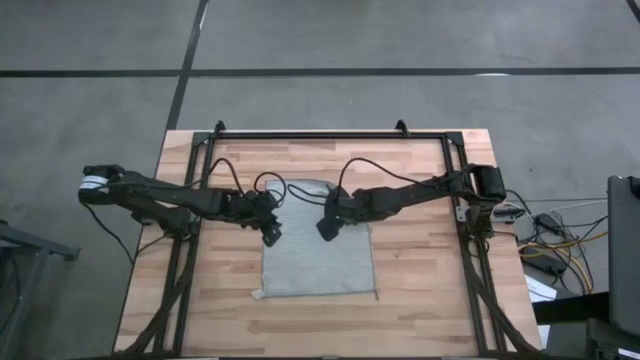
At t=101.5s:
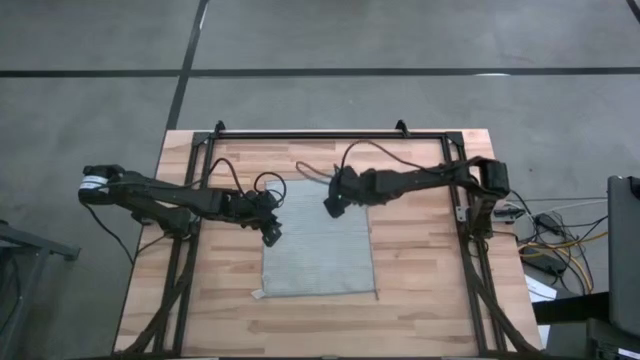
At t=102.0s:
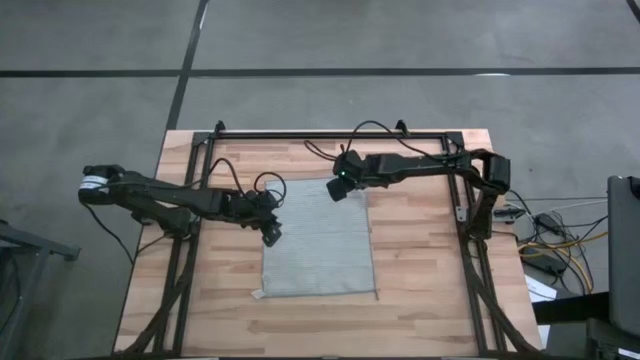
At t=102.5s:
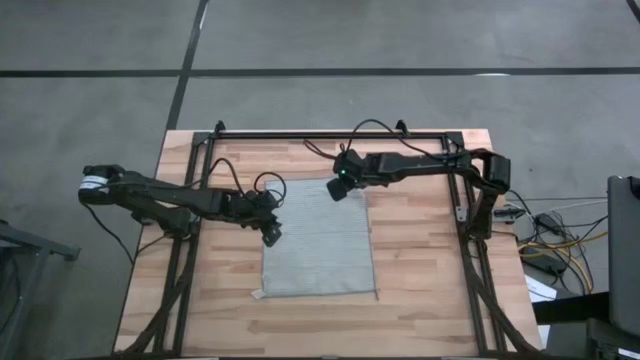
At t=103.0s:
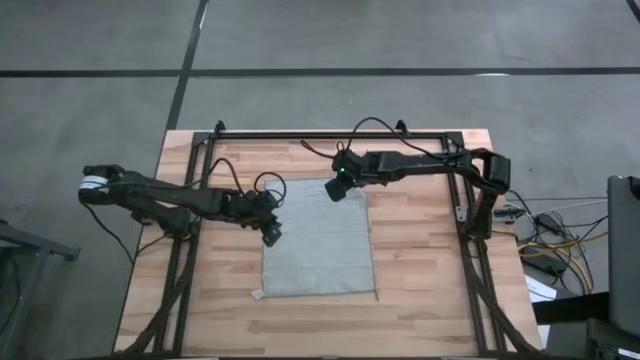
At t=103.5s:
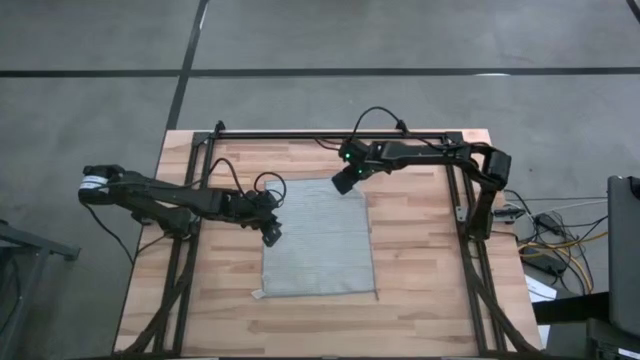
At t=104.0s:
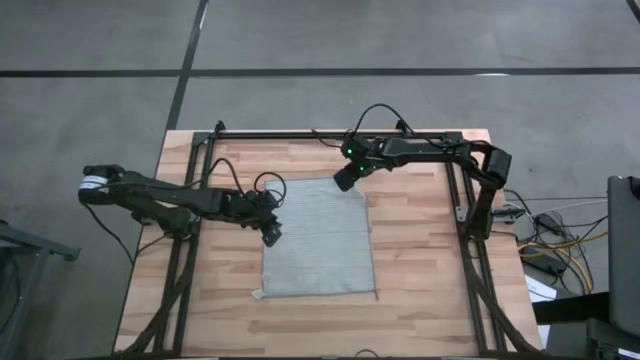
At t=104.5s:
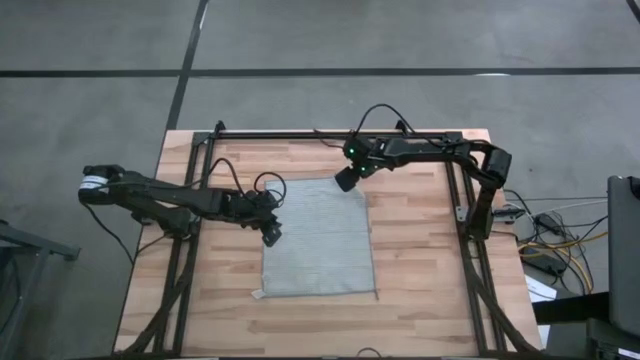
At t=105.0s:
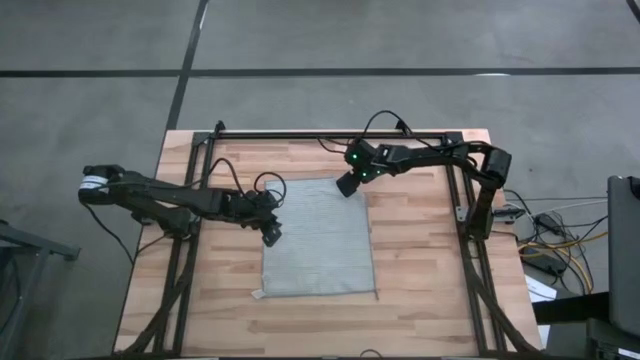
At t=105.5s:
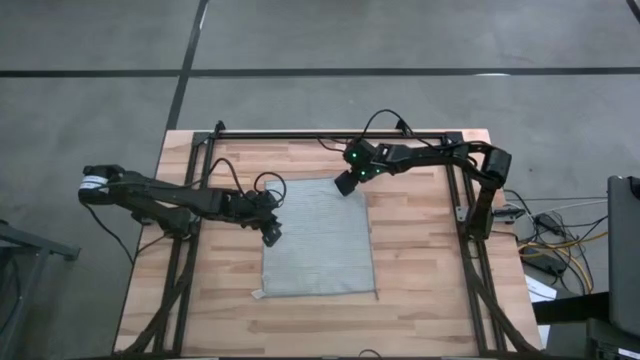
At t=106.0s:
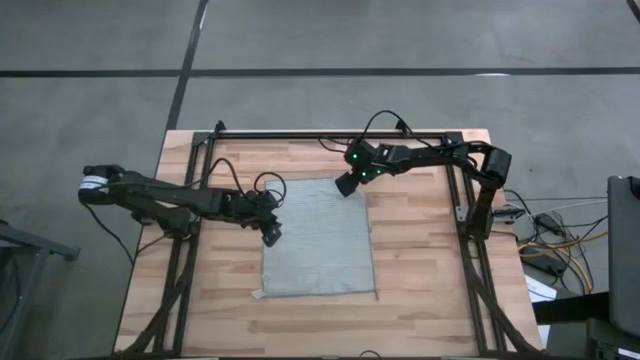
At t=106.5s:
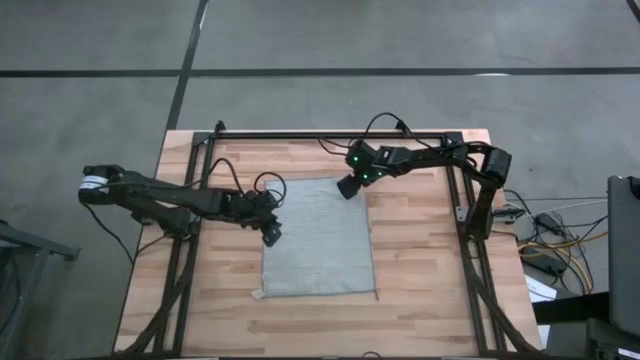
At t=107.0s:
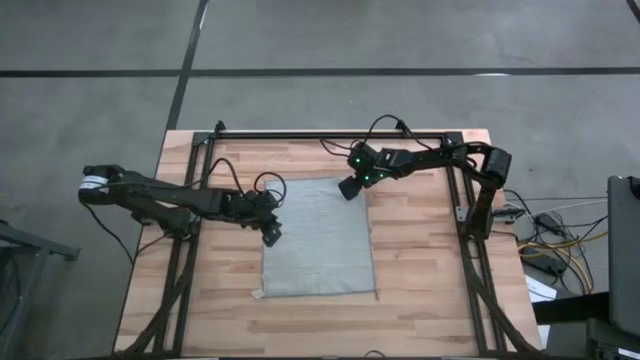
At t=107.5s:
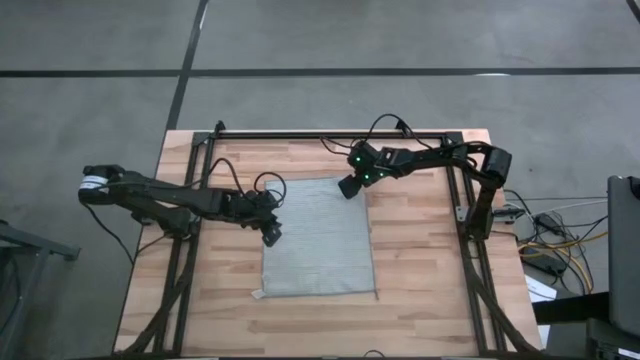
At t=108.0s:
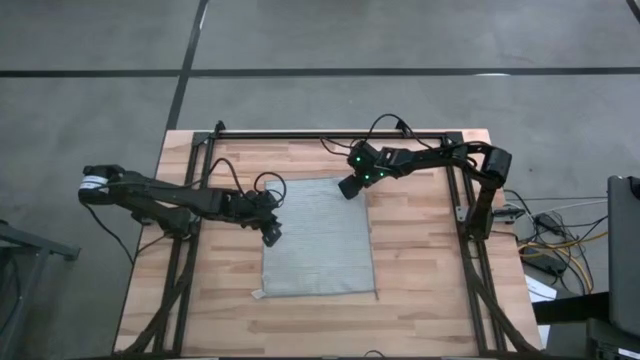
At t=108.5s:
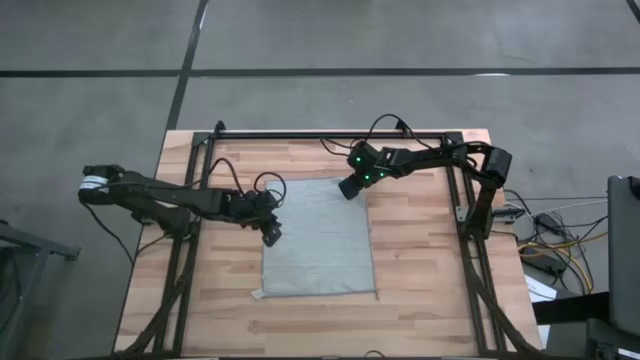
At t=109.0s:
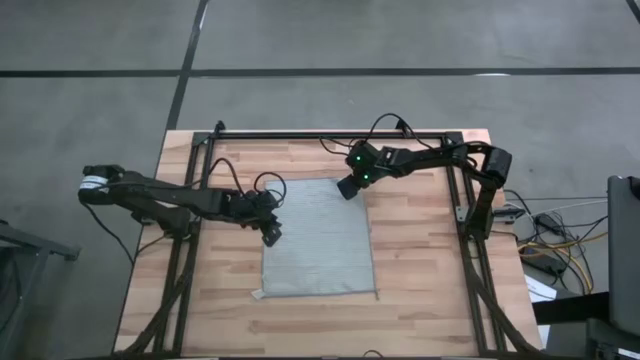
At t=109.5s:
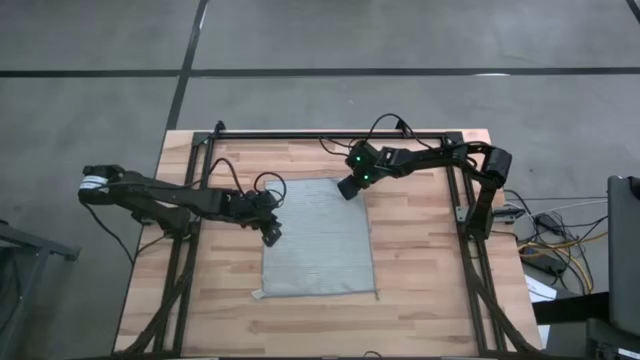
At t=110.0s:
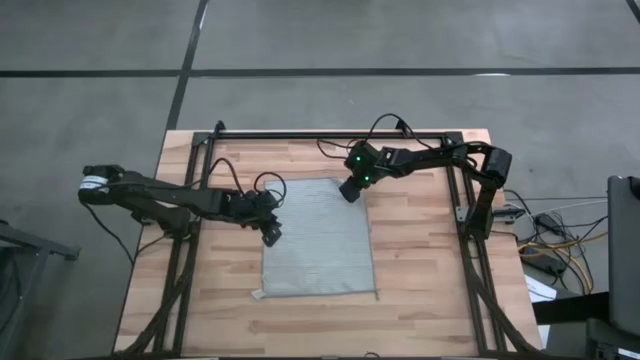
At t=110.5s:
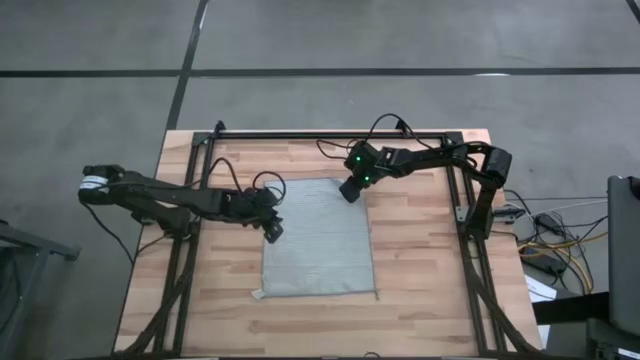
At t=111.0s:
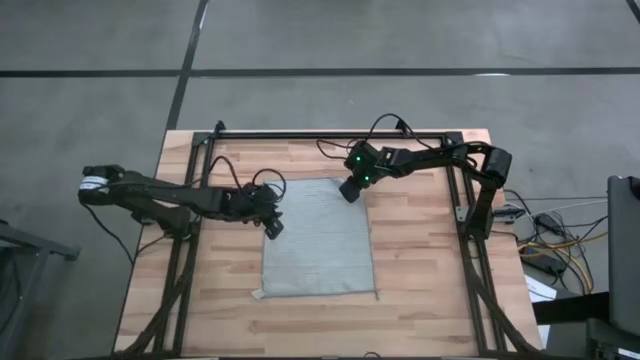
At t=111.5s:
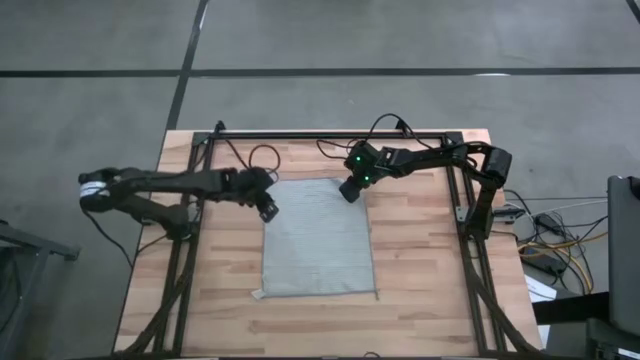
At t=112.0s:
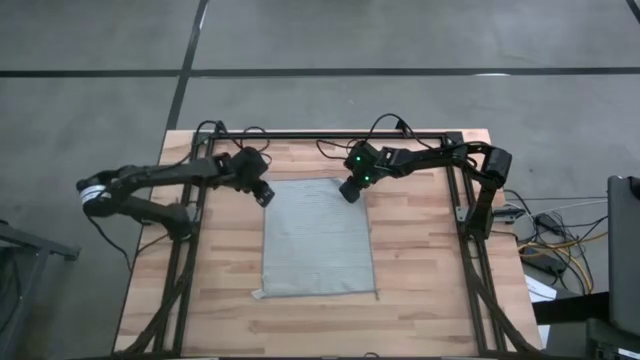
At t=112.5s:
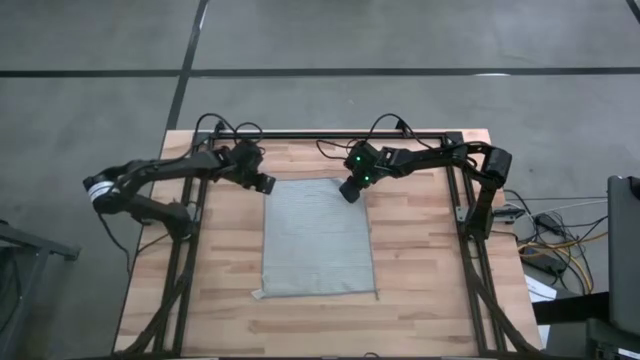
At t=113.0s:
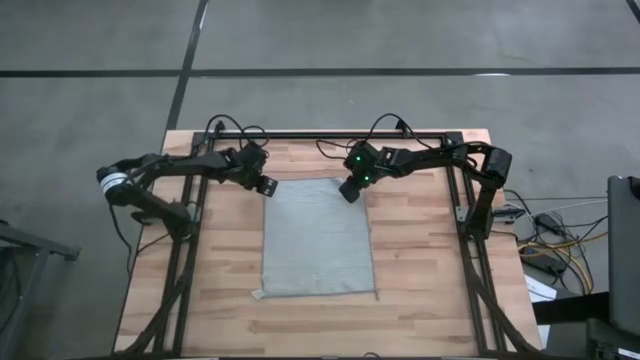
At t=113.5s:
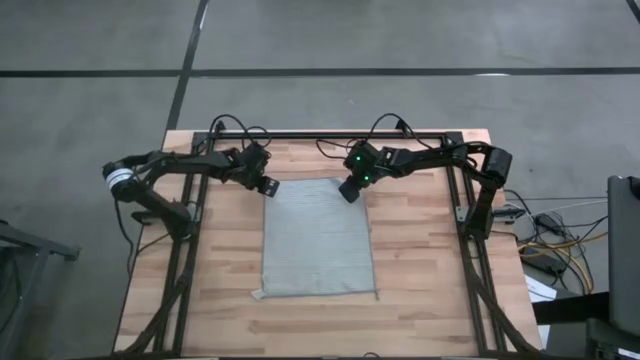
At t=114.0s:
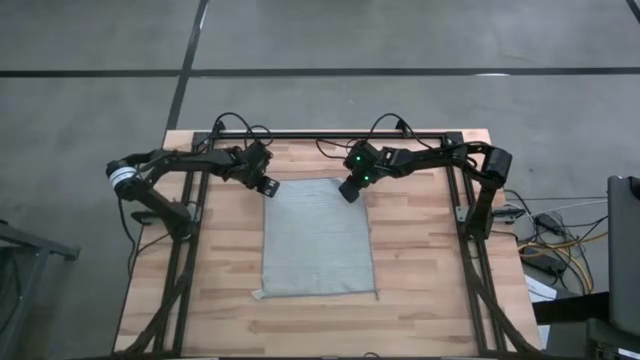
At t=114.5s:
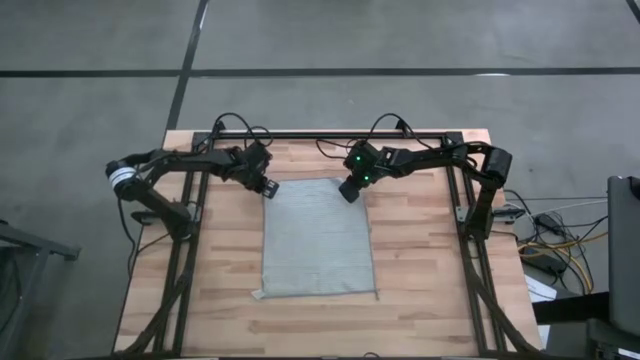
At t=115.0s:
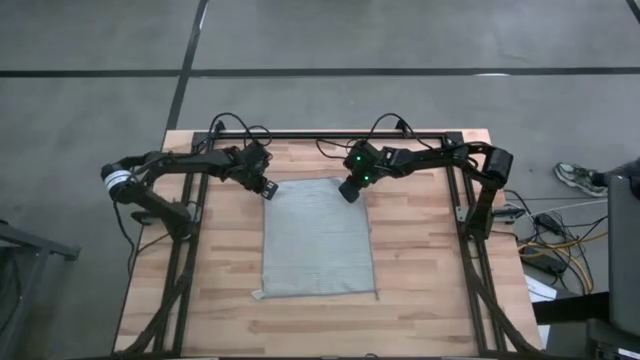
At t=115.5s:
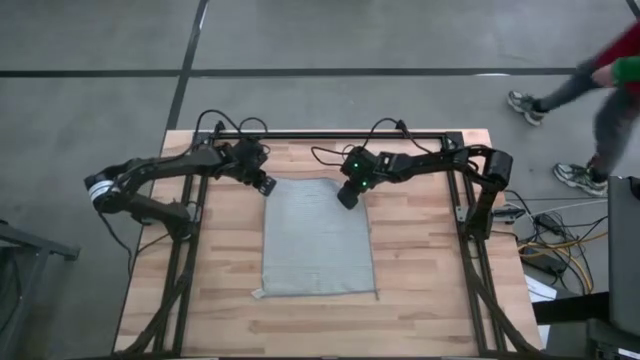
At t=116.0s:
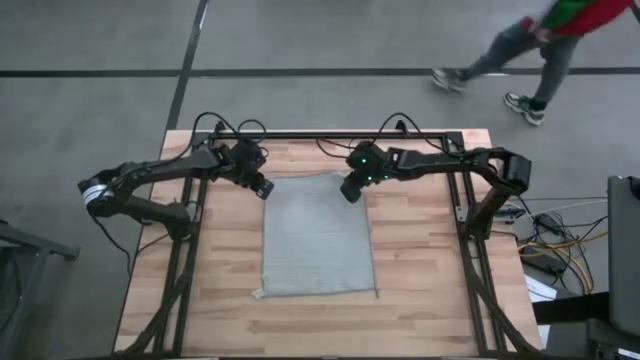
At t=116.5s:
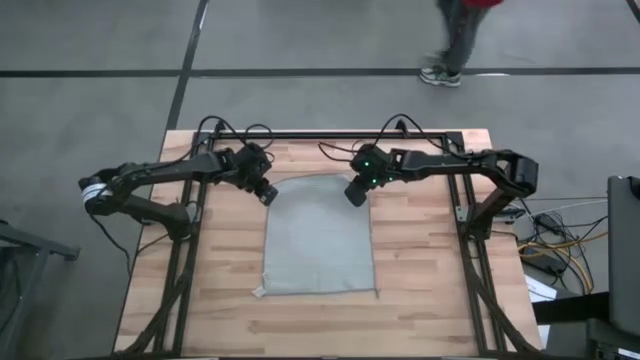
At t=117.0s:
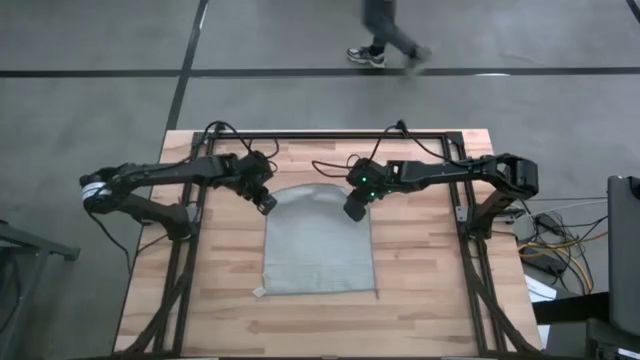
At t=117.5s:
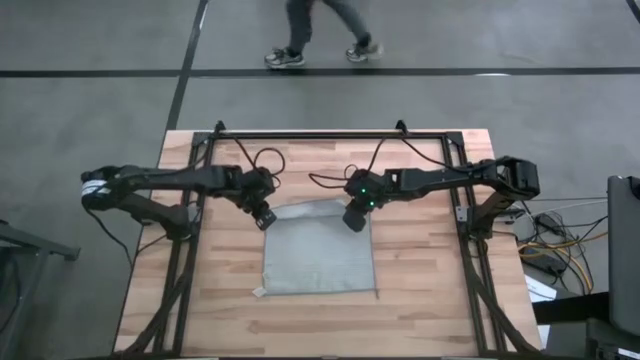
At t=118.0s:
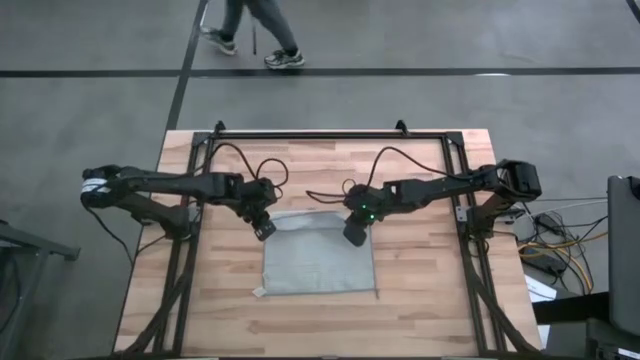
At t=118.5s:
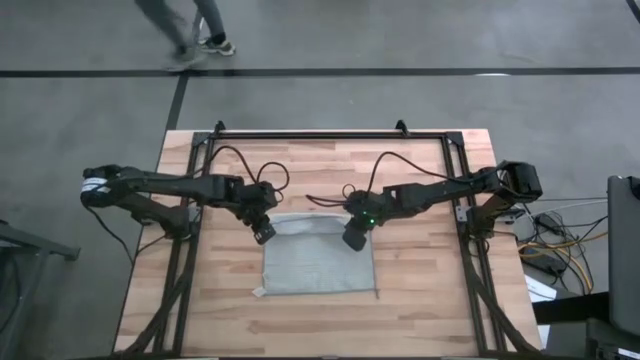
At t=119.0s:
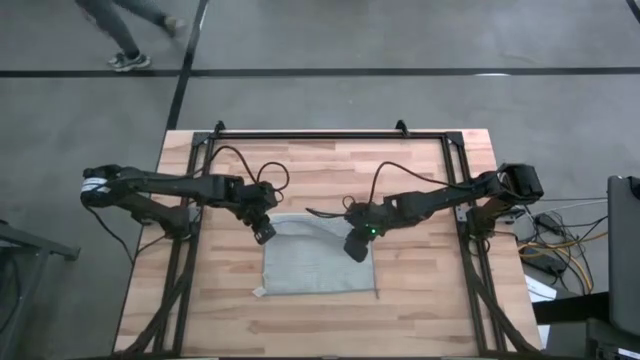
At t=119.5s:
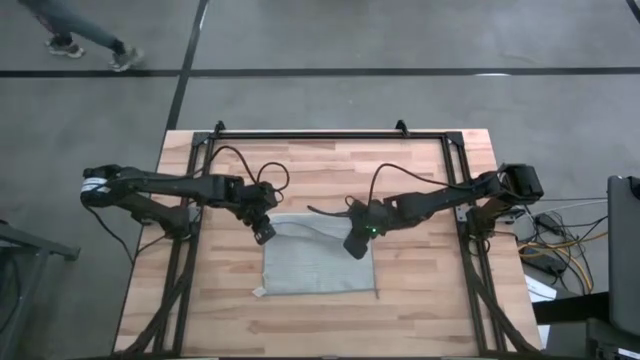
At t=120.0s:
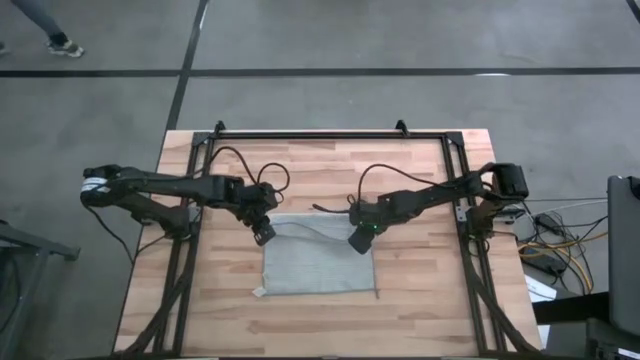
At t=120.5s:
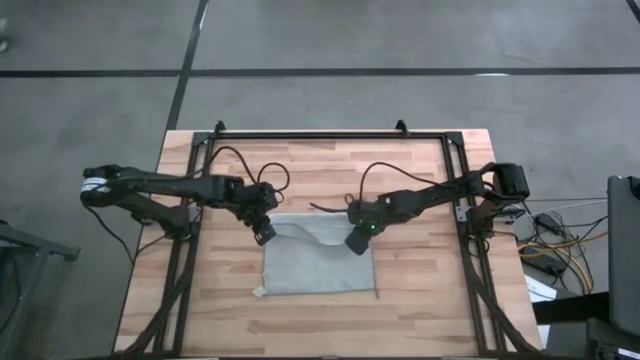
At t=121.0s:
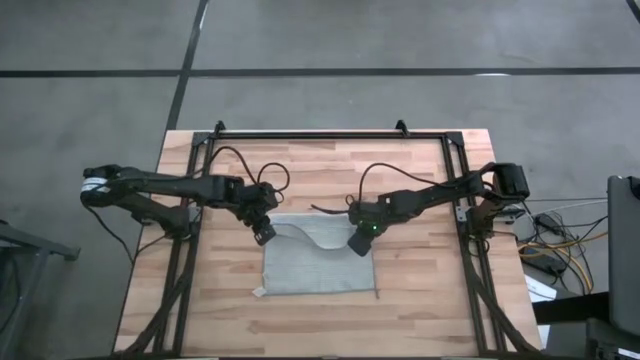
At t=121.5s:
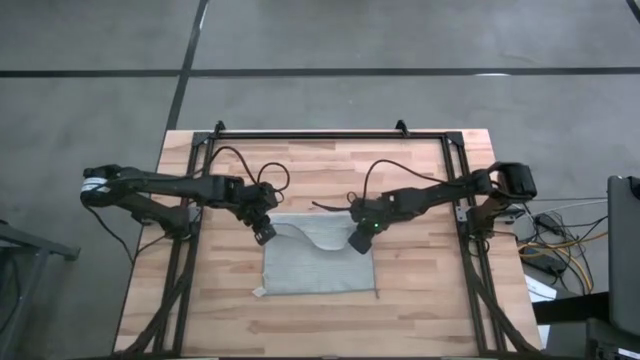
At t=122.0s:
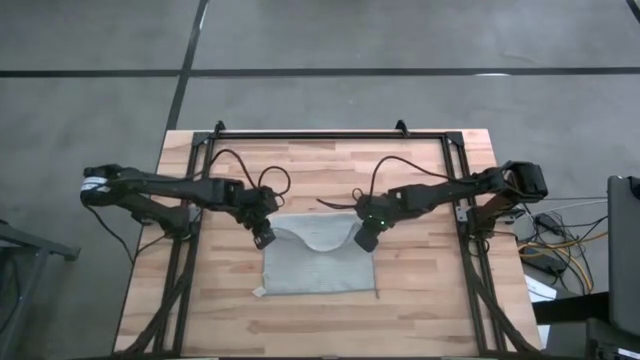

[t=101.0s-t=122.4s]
Task: Fold microfiber towels
Fold the microfiber cloth on the table
